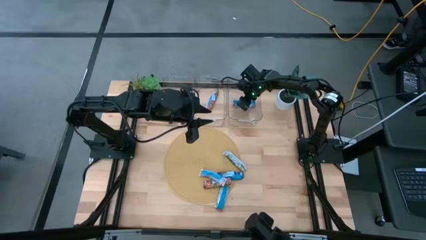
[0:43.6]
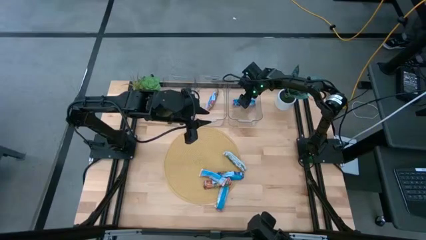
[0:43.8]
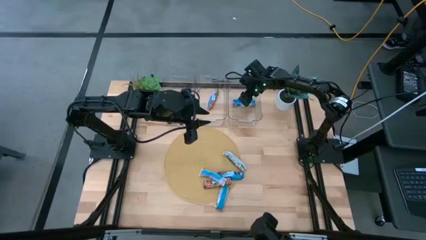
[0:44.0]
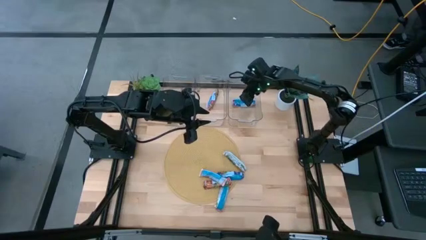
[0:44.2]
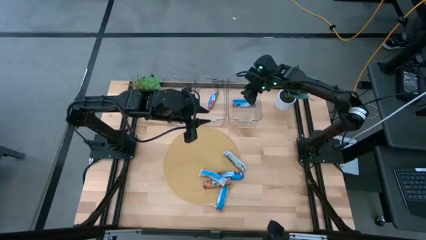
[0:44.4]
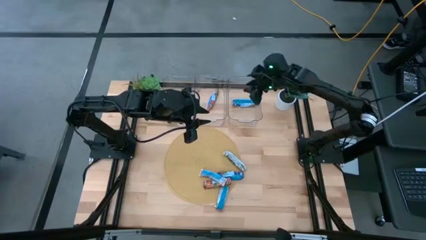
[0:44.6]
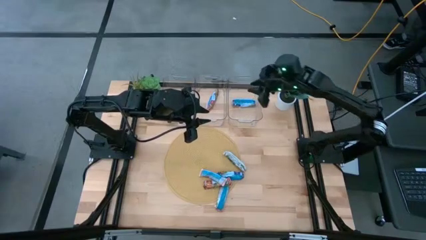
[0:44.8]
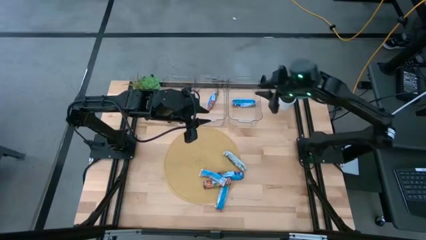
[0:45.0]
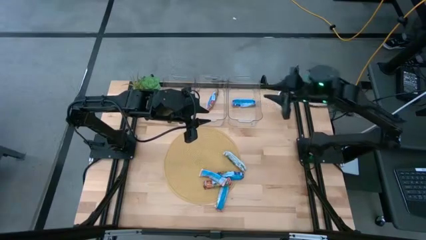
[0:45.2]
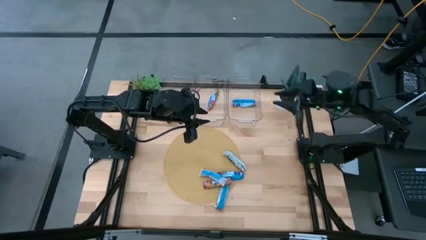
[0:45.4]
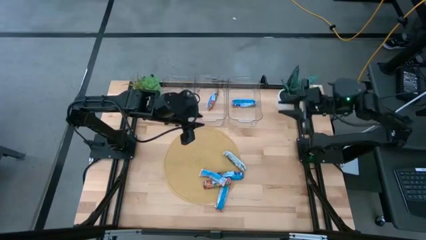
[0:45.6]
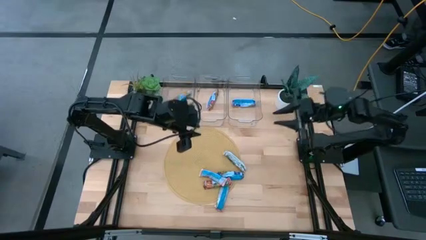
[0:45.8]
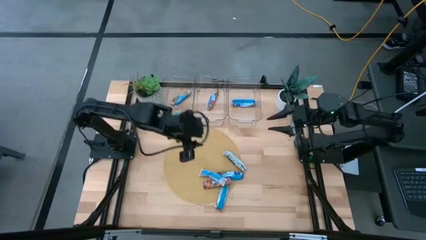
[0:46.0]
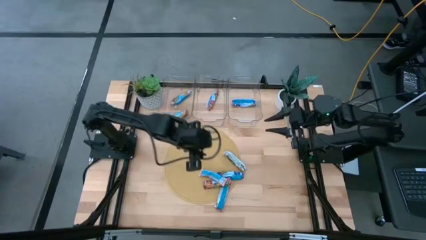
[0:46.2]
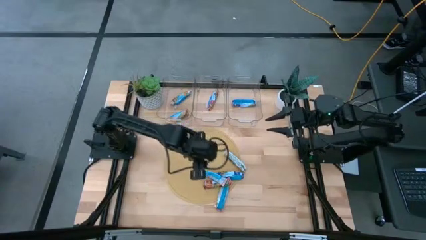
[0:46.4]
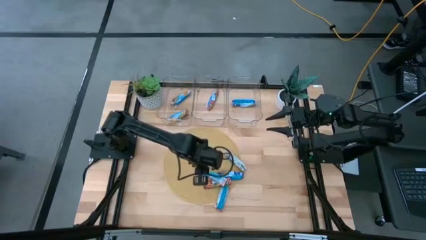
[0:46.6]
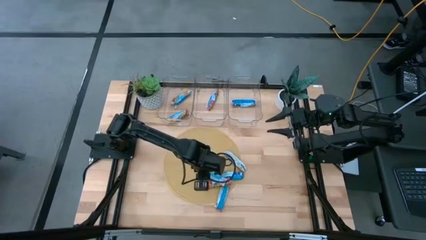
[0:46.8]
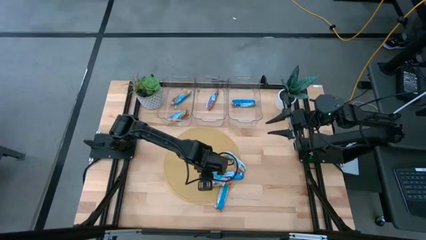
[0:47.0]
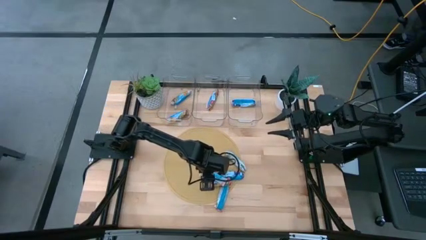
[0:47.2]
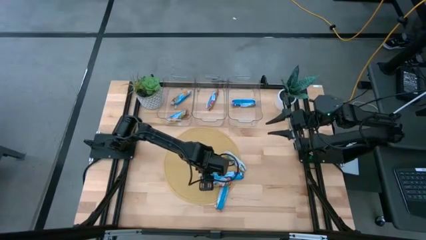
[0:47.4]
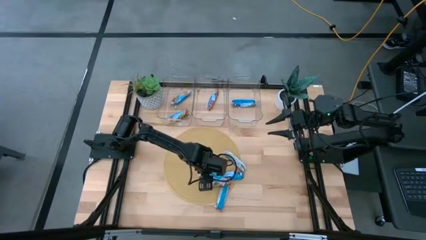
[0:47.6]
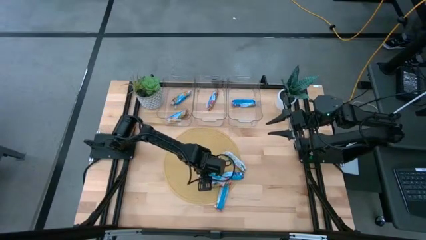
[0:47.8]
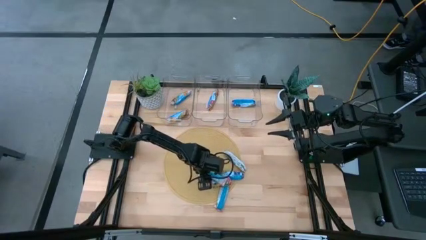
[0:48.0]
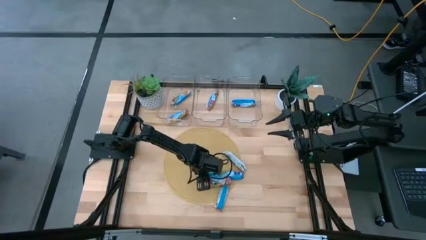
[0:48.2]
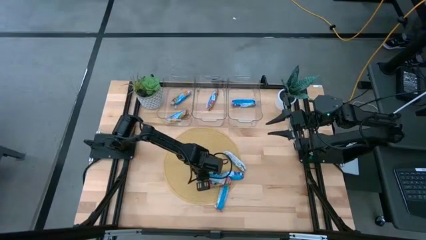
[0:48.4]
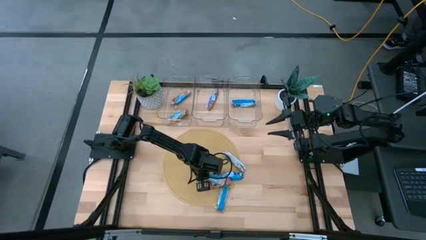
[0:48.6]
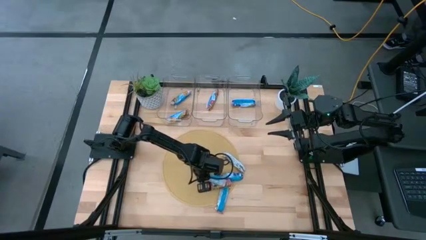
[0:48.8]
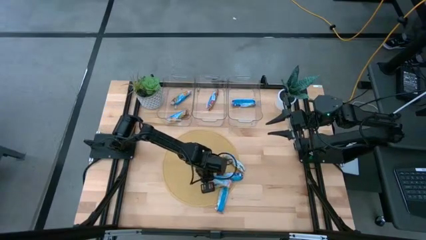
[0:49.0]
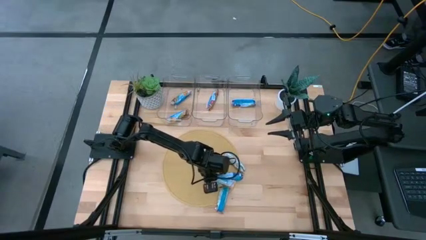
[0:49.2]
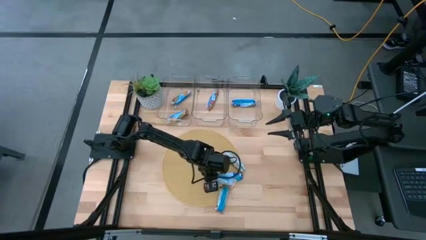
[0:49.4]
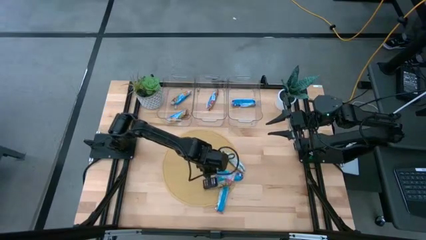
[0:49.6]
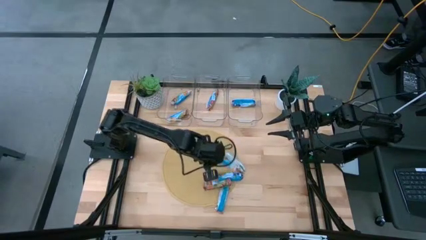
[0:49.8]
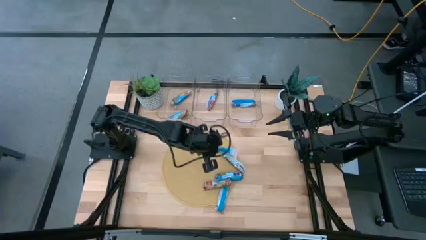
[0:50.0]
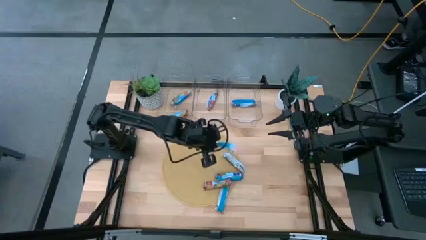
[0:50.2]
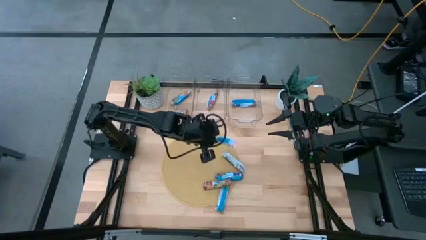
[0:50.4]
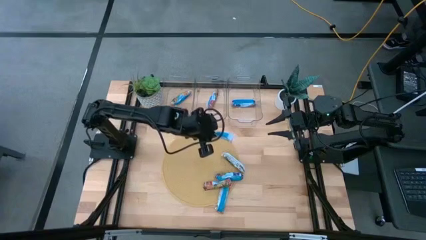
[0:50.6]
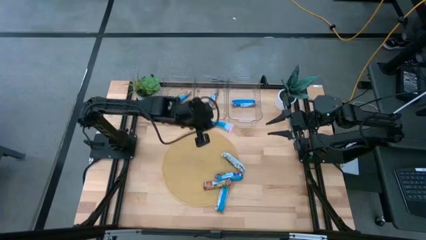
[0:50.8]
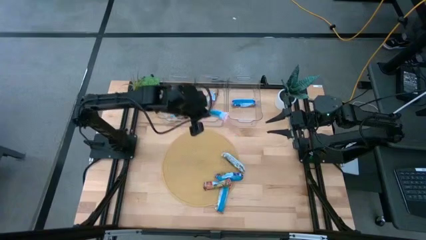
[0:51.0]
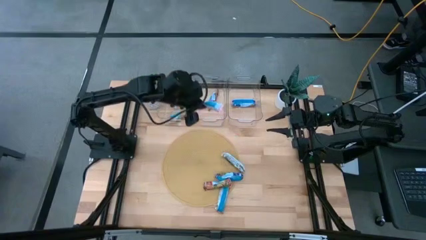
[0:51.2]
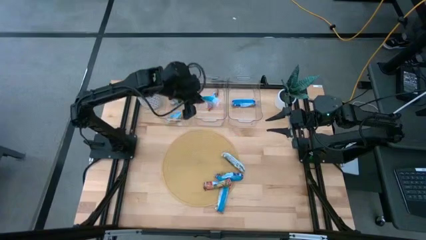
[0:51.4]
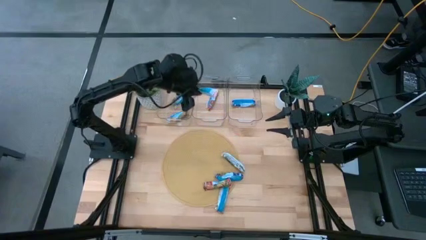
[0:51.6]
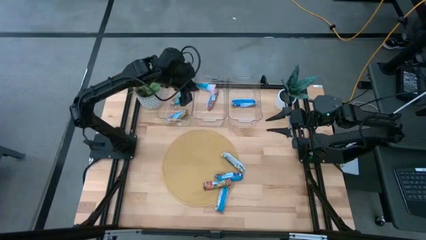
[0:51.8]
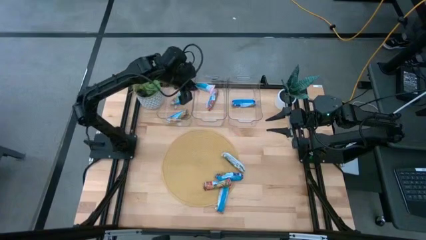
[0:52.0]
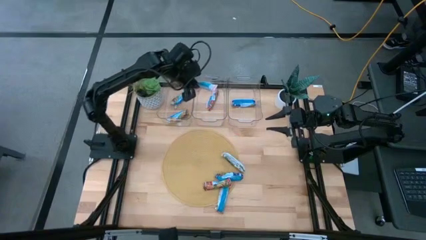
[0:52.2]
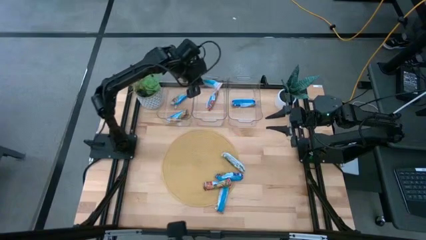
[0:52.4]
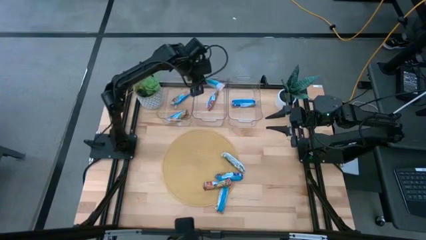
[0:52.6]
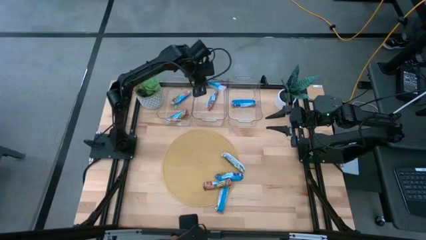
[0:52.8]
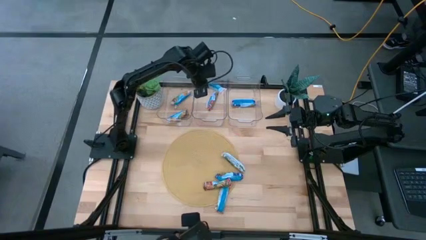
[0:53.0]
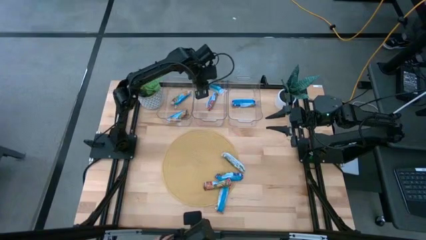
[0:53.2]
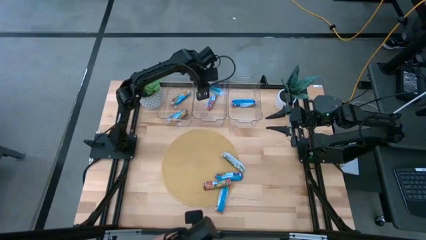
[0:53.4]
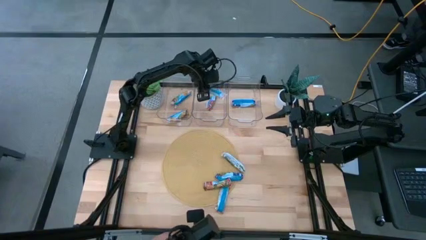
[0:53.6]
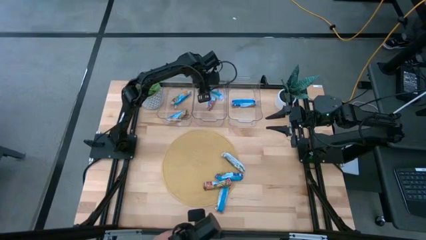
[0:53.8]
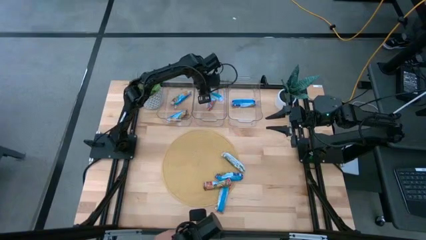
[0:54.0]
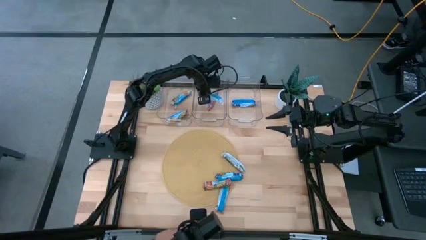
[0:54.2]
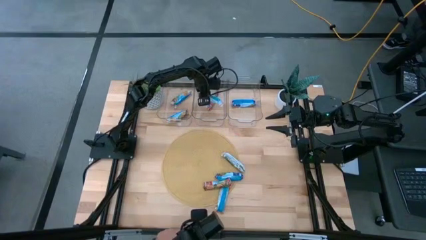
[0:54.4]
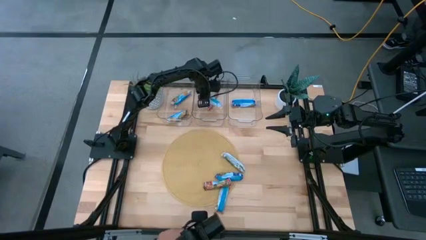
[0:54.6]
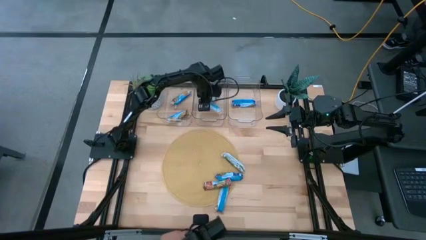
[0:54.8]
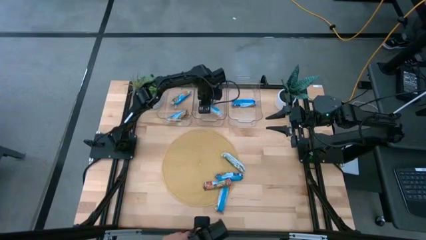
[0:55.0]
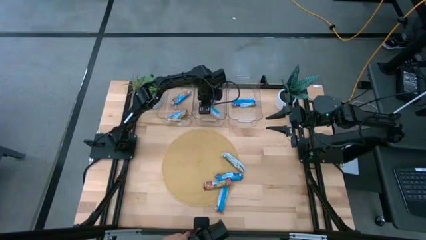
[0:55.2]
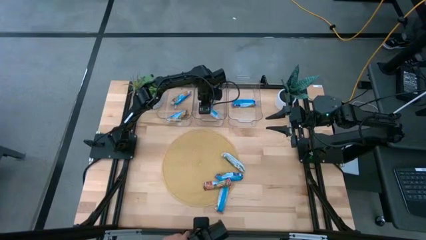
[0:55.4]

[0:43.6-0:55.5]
Task: Pick and place Granola Bars by type
Put the red granola bar into the middle transparent bin

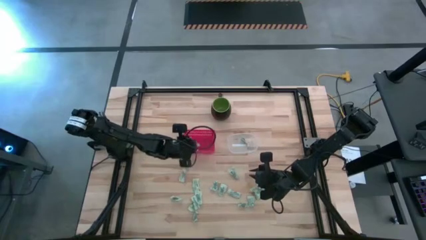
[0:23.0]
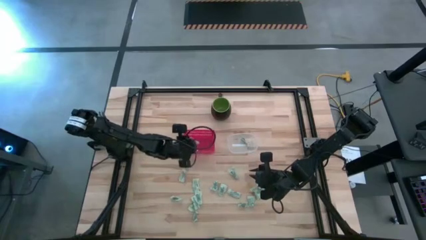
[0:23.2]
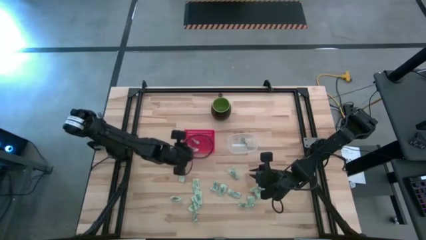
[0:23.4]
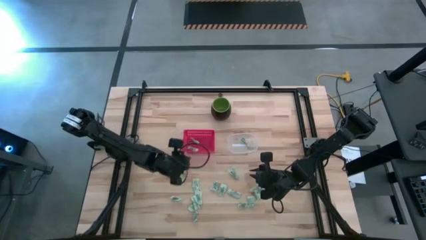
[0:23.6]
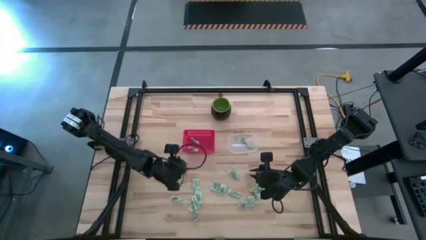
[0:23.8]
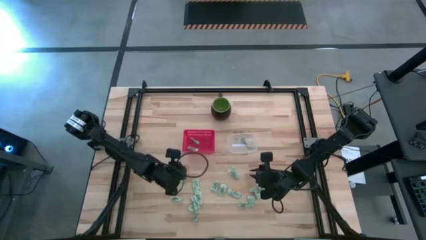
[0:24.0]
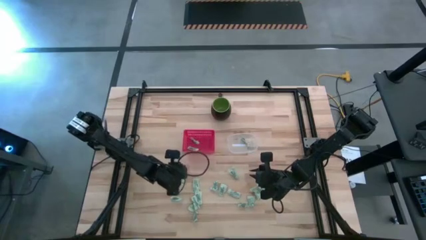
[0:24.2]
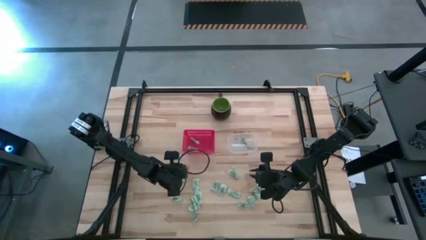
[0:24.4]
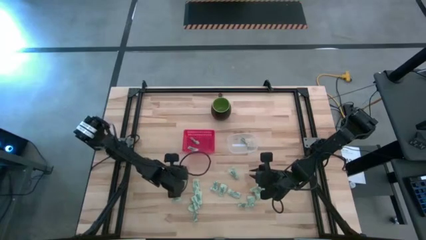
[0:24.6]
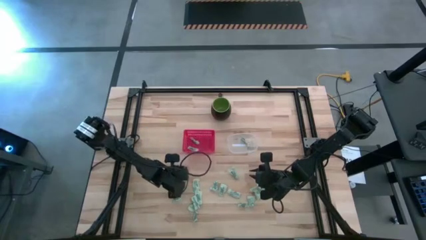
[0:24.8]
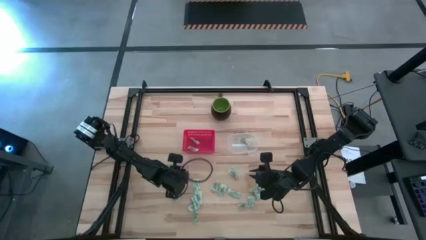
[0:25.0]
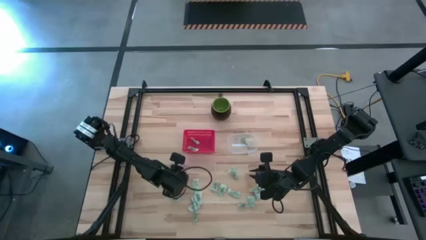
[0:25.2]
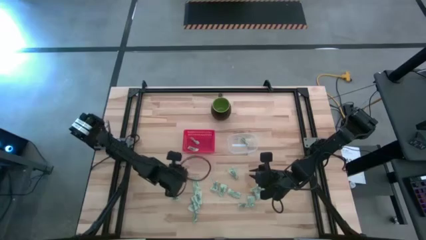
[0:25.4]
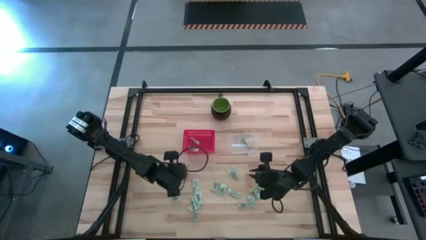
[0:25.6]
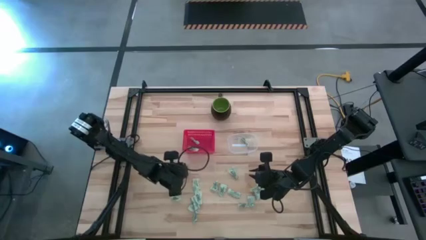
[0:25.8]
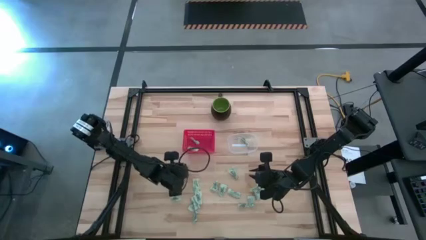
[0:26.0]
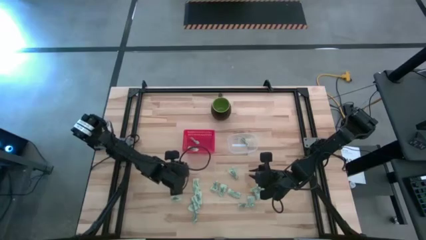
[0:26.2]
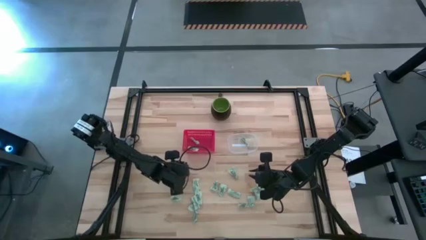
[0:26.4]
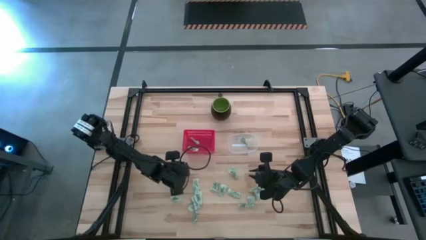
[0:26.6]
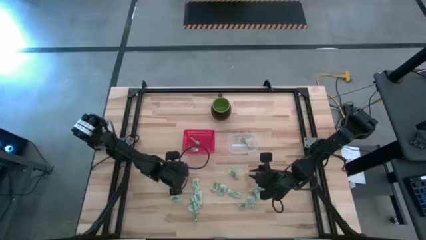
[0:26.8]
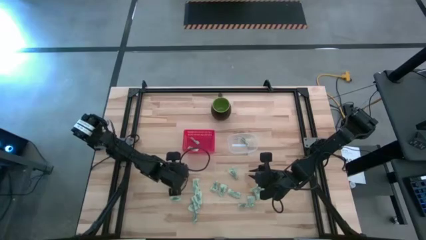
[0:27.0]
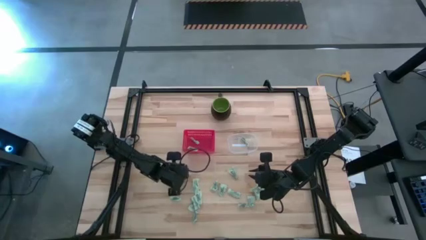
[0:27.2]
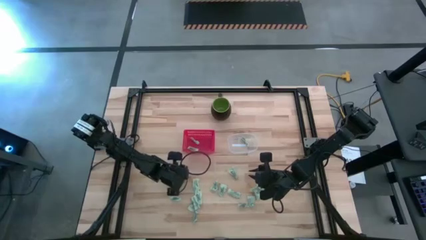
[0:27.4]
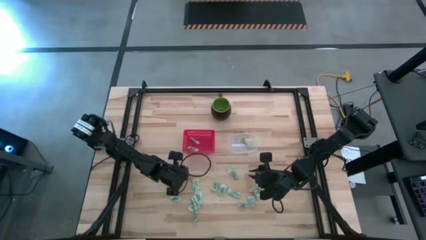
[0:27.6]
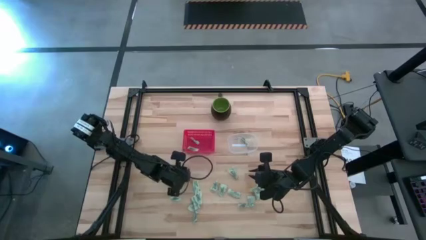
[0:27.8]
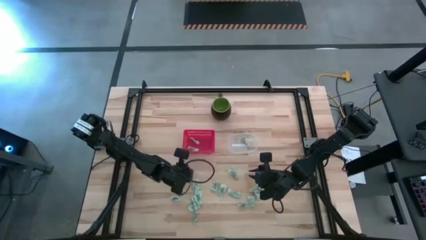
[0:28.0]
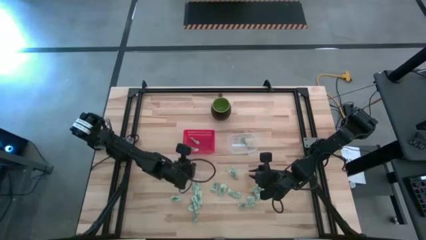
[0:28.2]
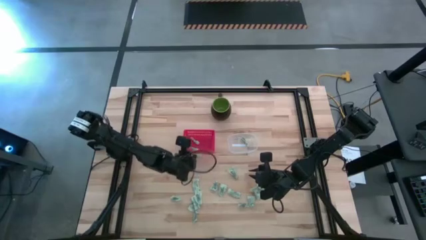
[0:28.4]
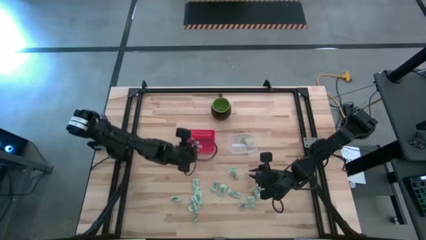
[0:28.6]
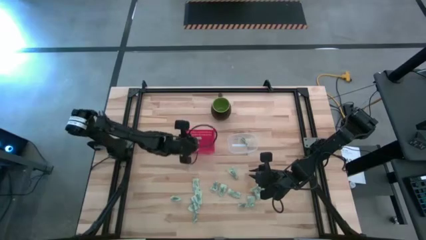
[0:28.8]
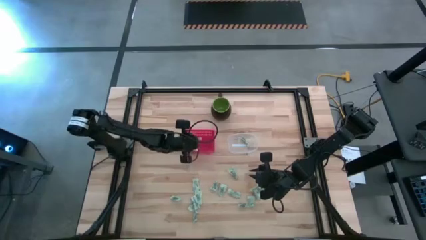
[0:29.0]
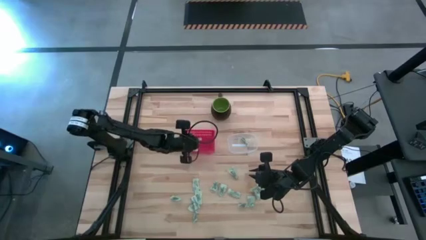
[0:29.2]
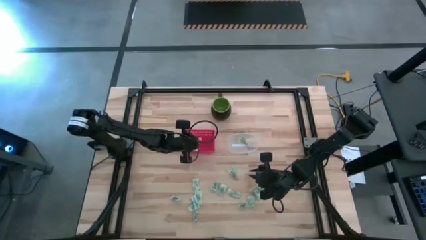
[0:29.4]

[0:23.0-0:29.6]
Task: Pick and place items into bin
Put the stevia packet into the red bin
